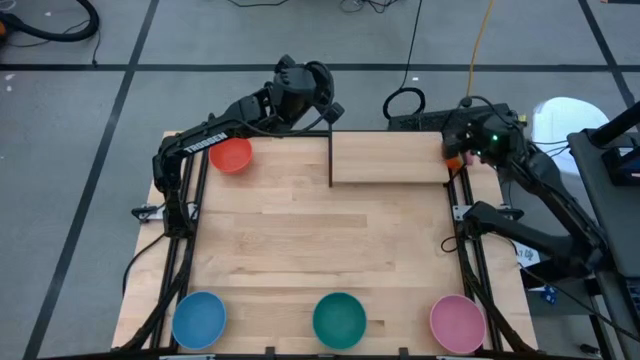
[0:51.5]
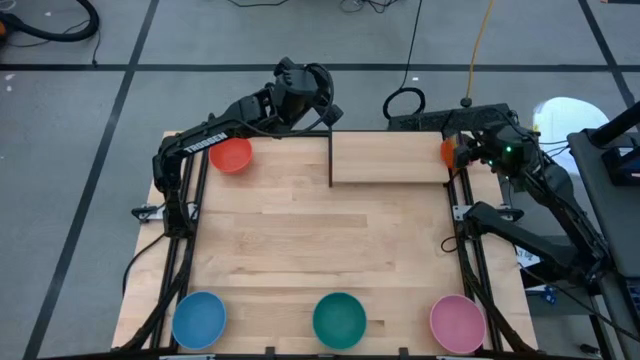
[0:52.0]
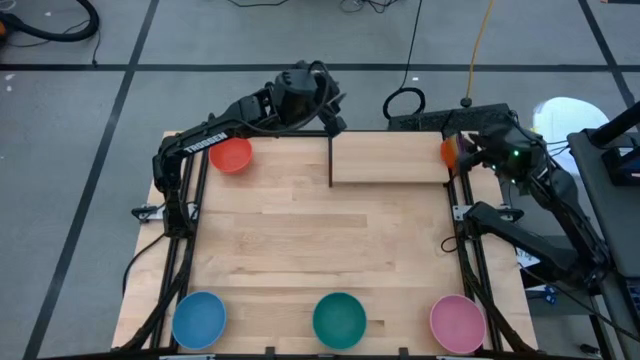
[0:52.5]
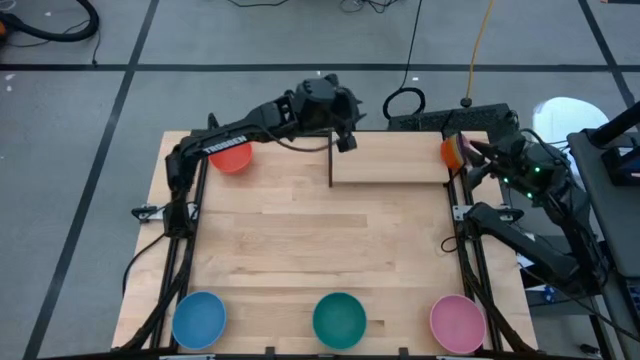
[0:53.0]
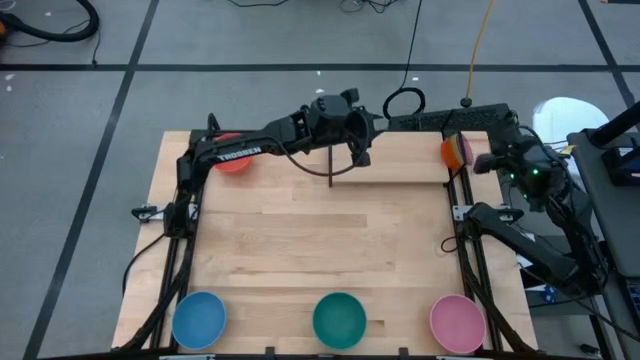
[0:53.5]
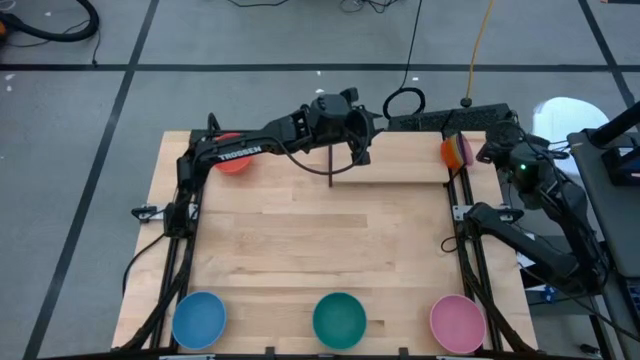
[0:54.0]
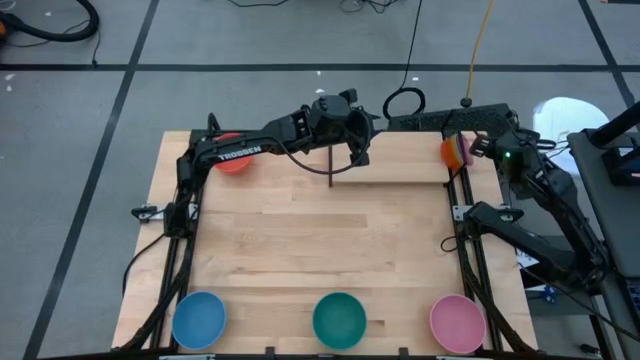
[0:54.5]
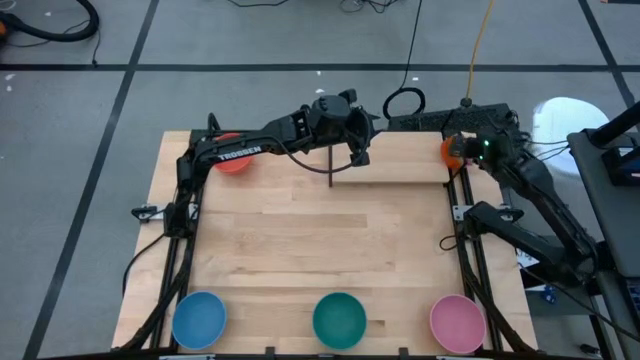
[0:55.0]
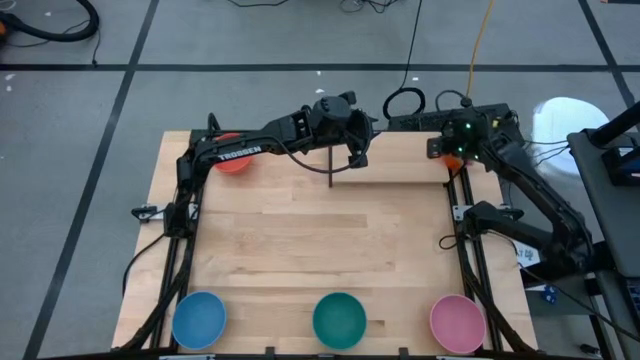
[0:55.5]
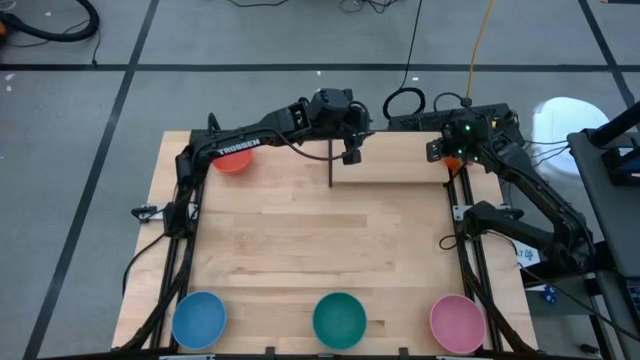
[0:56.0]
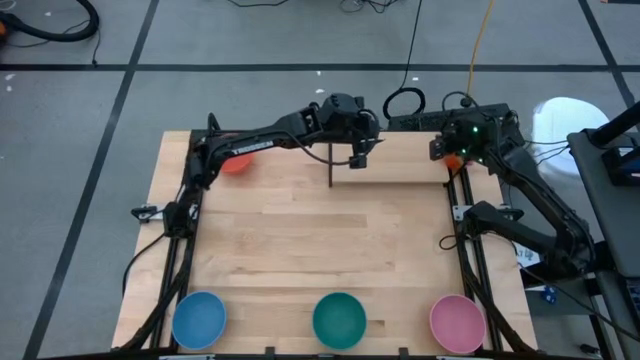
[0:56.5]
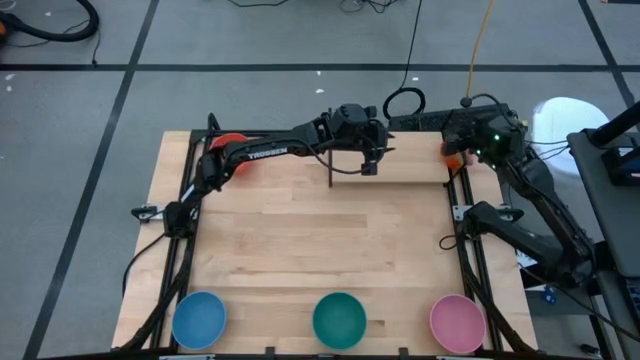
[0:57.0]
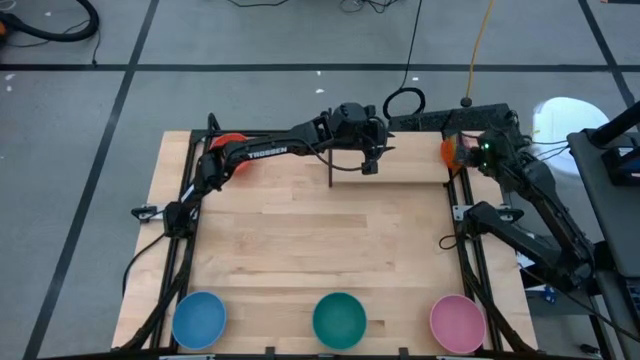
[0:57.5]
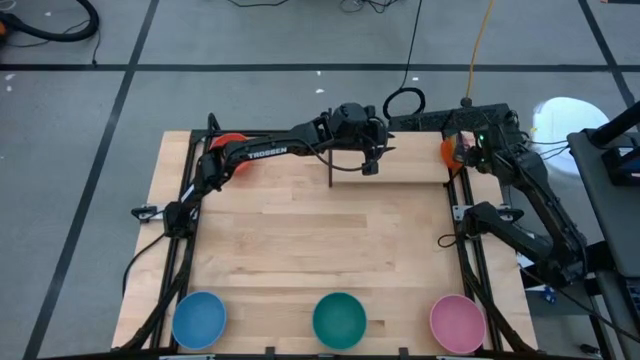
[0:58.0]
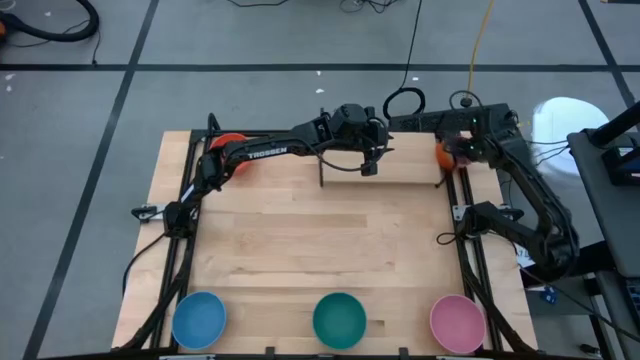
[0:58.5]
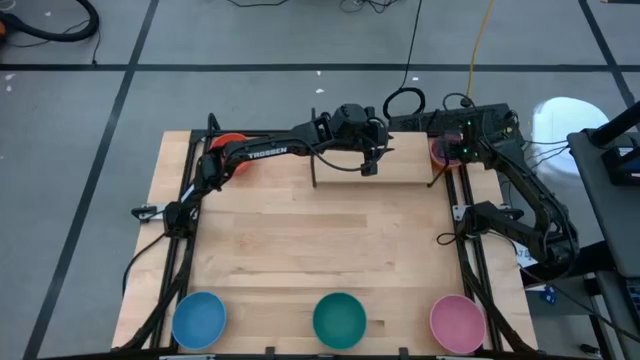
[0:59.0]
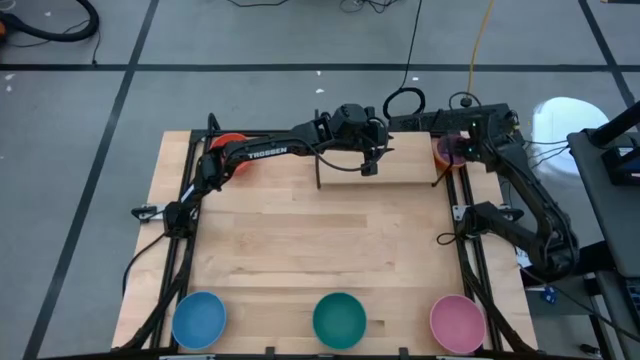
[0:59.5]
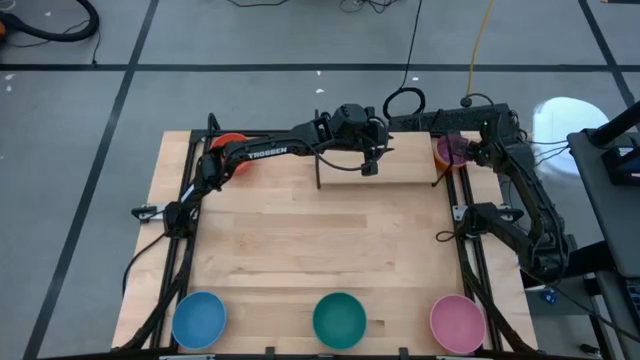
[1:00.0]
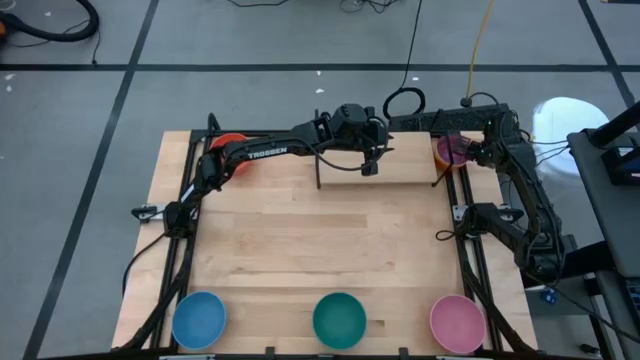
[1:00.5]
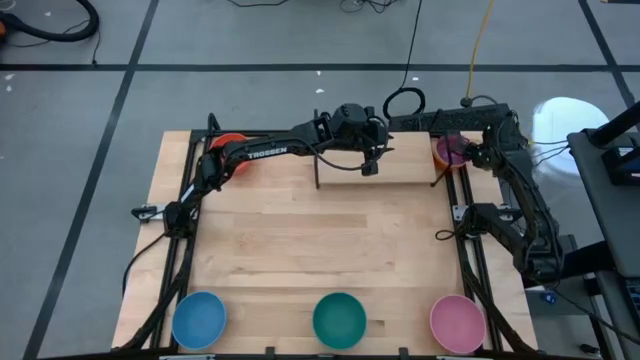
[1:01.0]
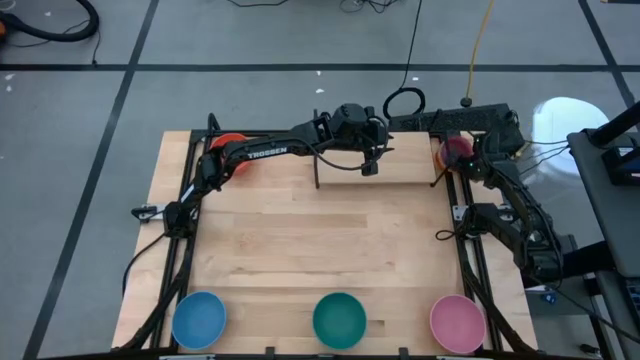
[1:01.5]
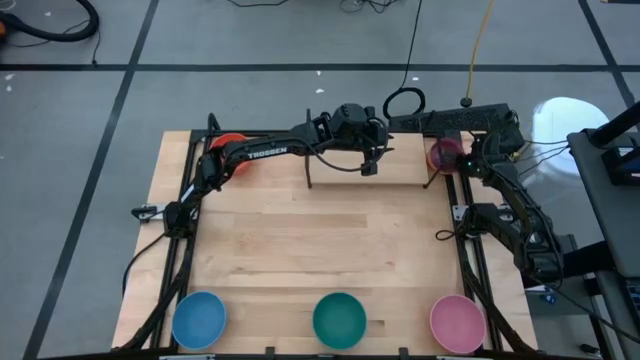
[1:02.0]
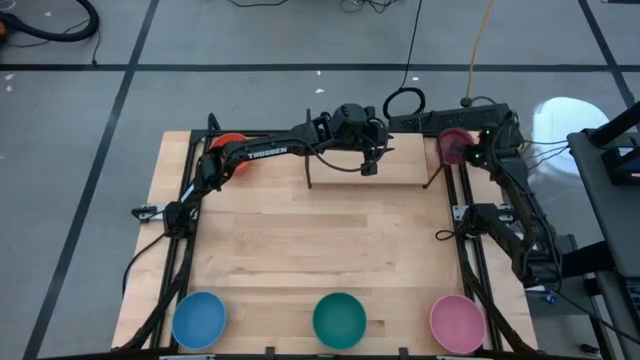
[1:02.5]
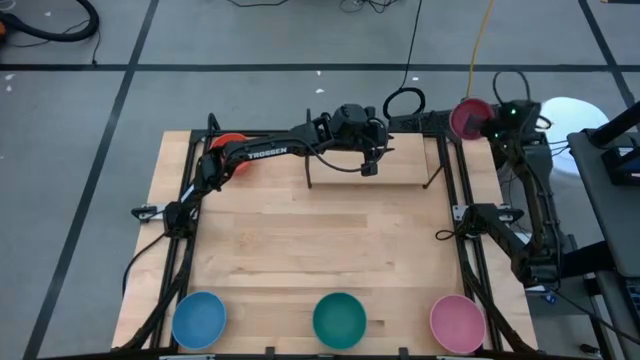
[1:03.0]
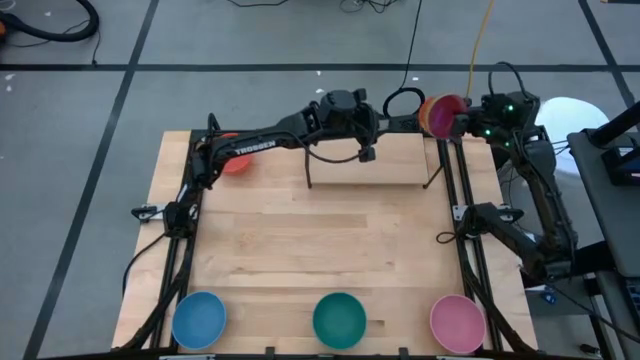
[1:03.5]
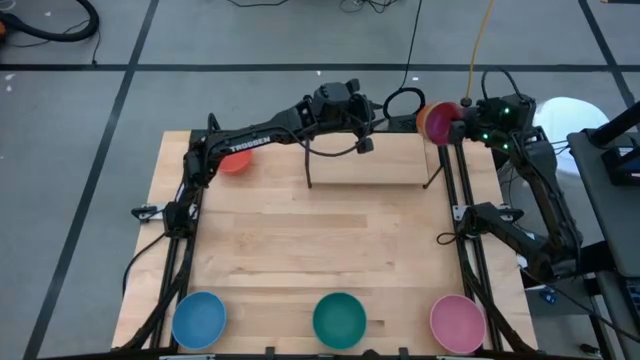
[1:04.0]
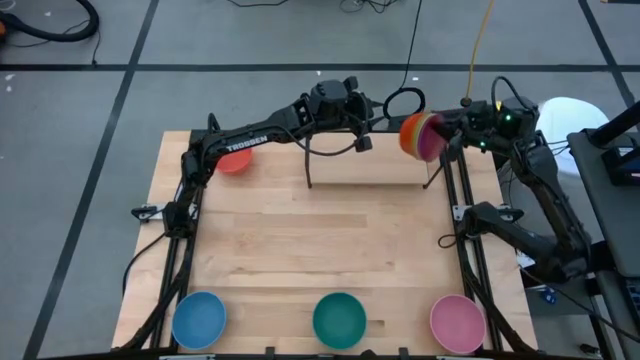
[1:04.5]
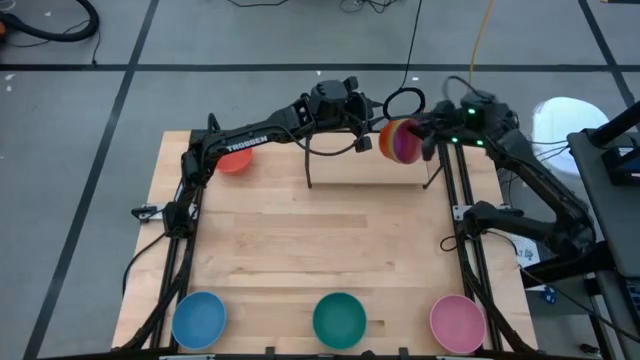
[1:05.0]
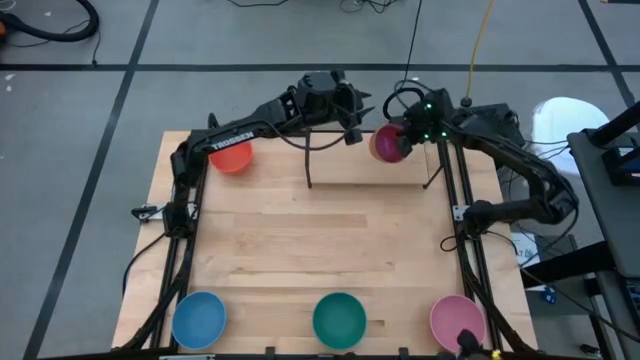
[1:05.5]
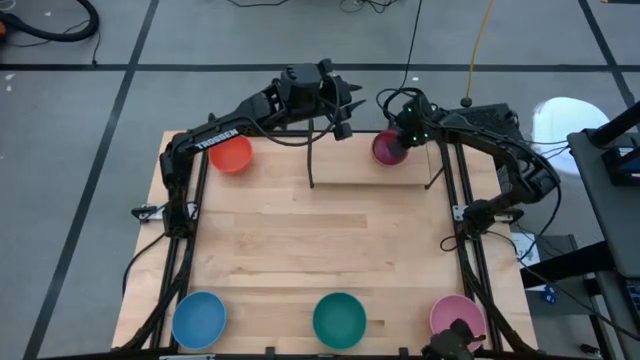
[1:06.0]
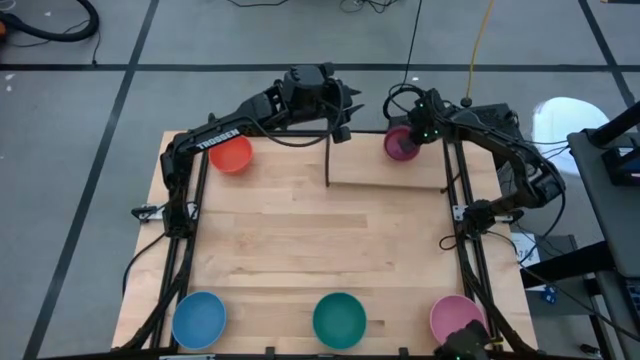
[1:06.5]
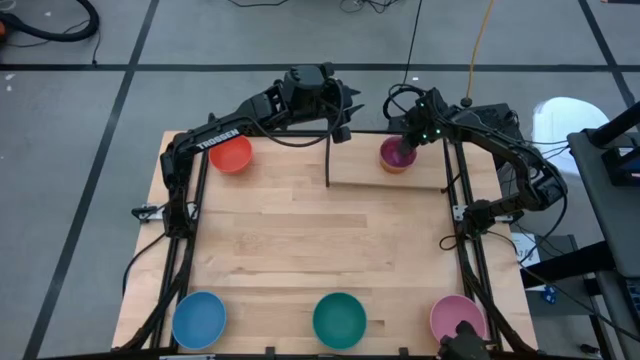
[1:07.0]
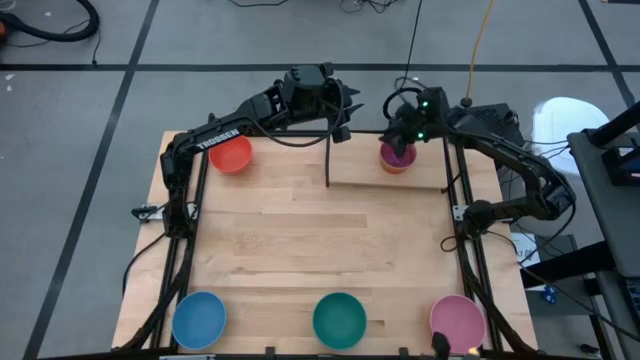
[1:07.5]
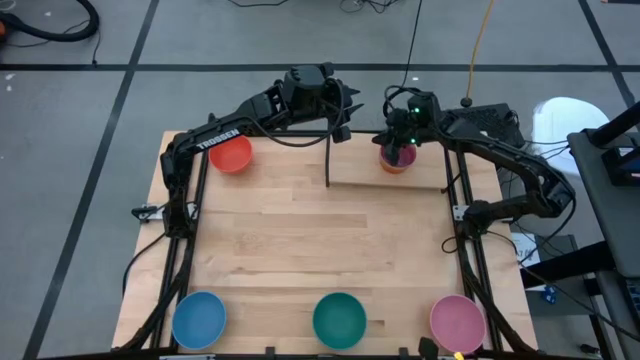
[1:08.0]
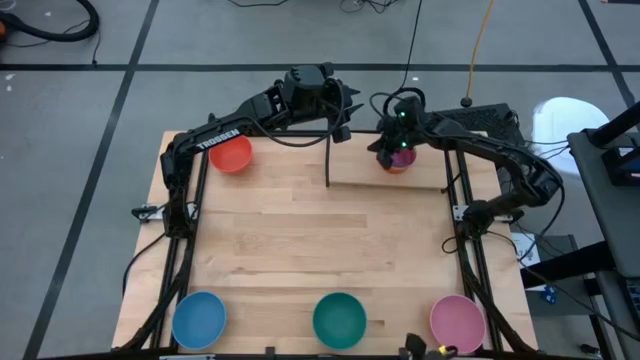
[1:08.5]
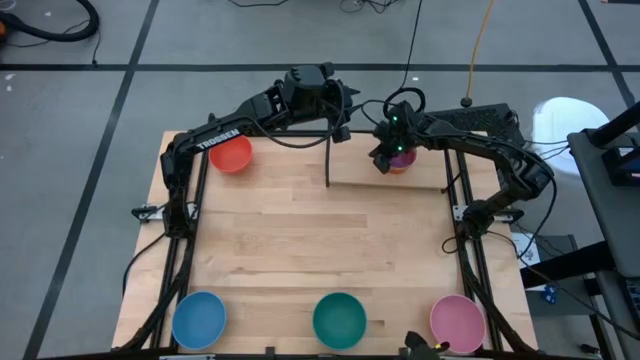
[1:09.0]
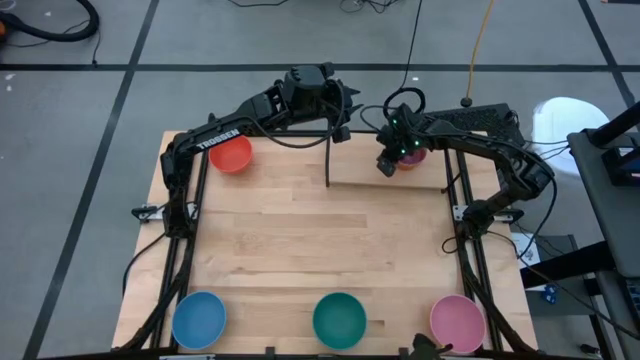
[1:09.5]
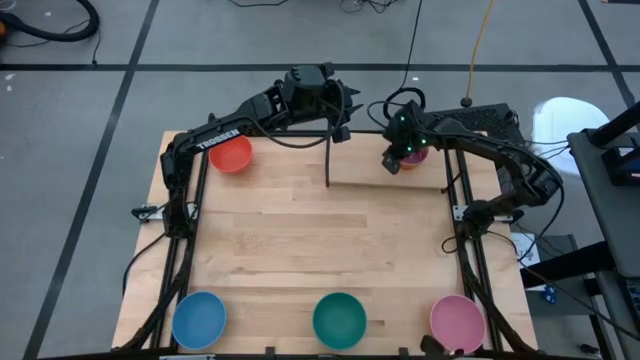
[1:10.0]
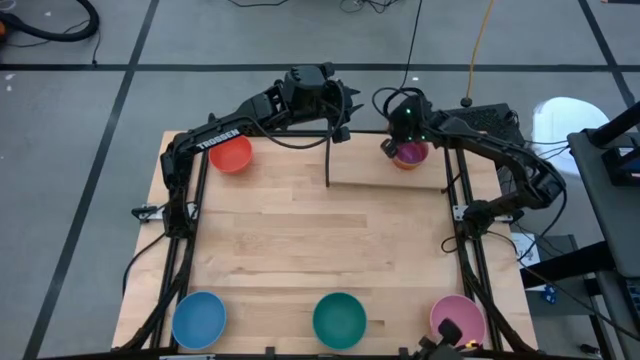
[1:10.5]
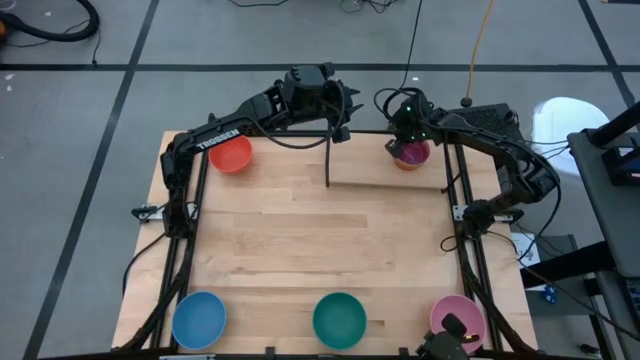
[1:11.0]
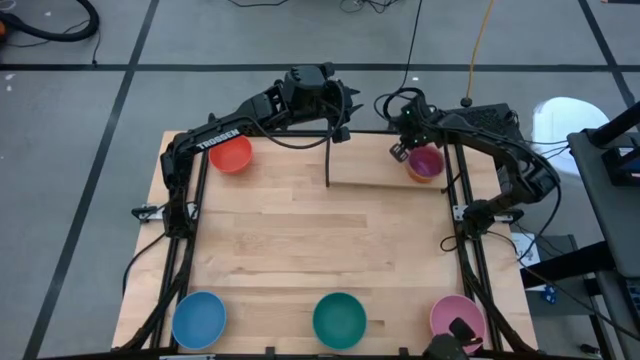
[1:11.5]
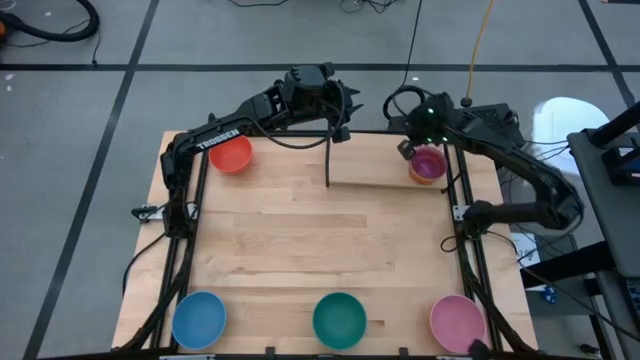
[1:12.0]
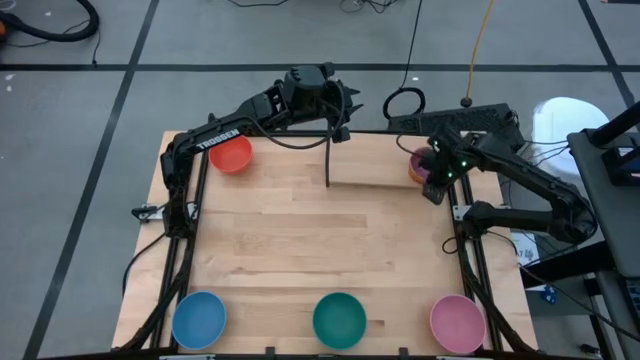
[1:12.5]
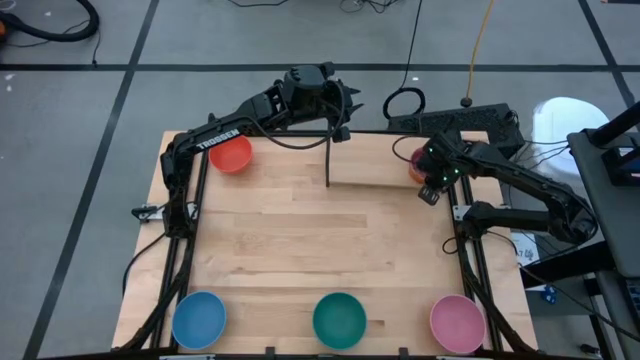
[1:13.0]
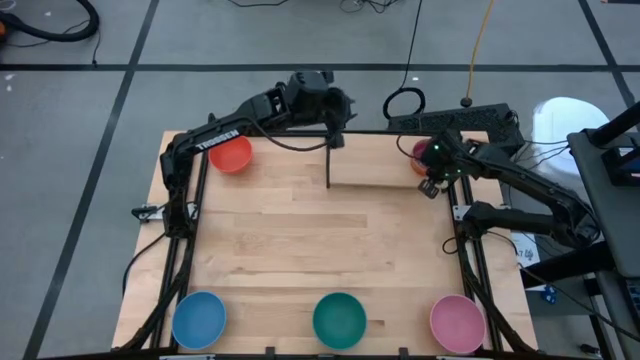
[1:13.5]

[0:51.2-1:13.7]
Task: Place and stack bowls onto a shelf
Adjust the stacked small bowls on the shelf
